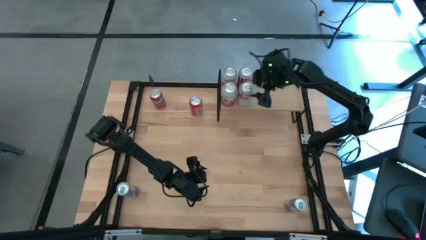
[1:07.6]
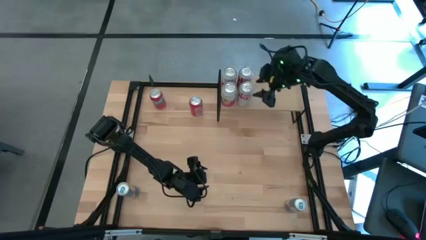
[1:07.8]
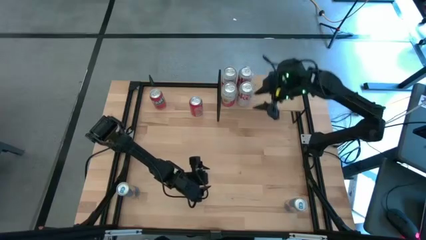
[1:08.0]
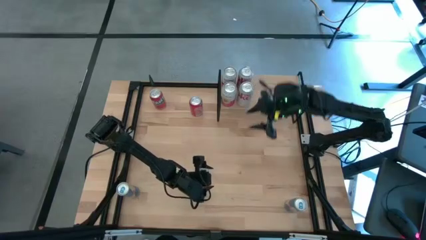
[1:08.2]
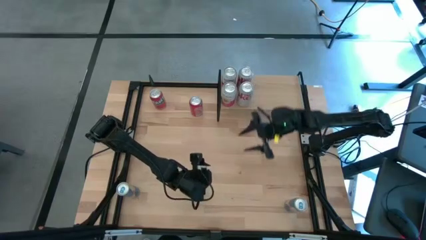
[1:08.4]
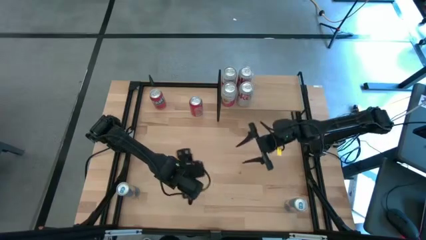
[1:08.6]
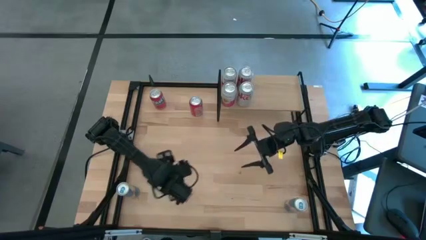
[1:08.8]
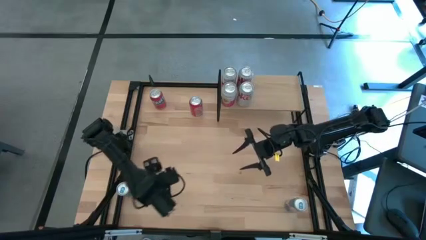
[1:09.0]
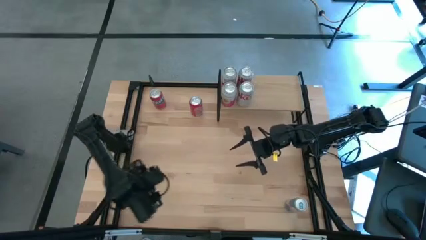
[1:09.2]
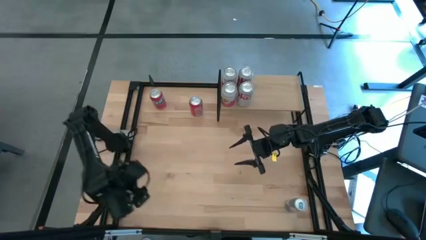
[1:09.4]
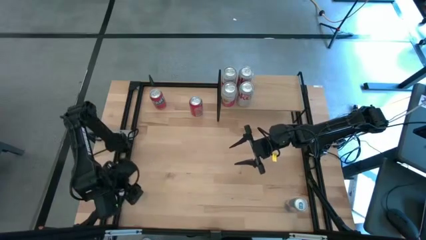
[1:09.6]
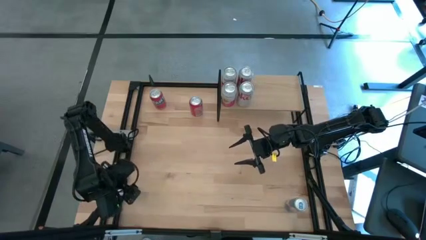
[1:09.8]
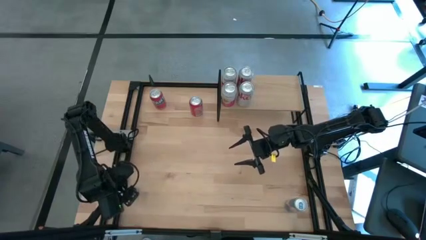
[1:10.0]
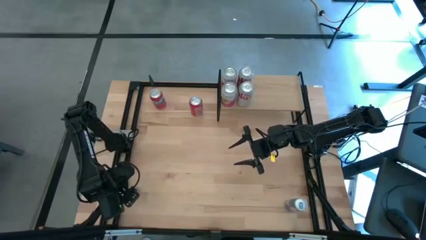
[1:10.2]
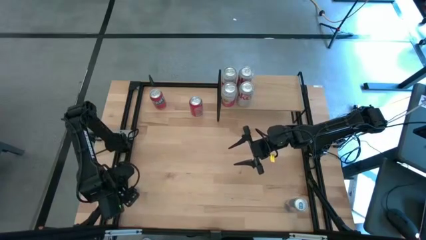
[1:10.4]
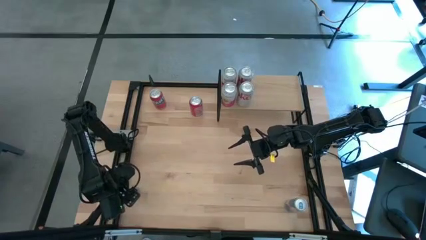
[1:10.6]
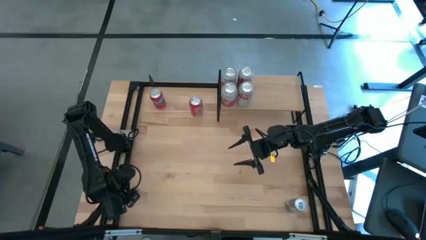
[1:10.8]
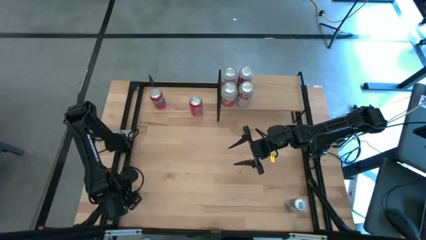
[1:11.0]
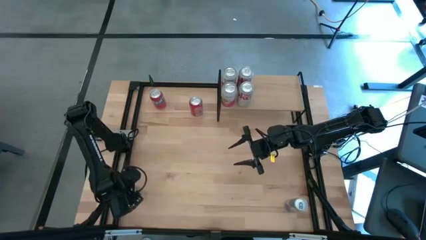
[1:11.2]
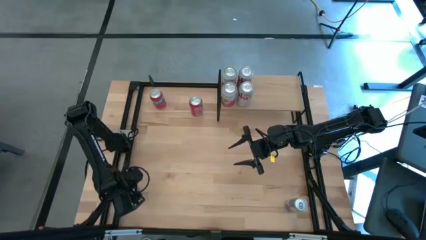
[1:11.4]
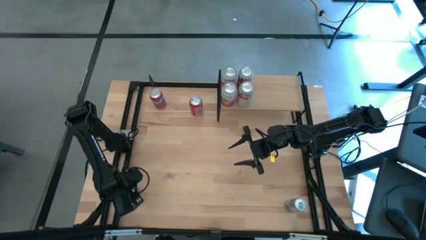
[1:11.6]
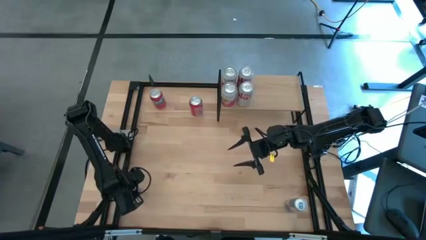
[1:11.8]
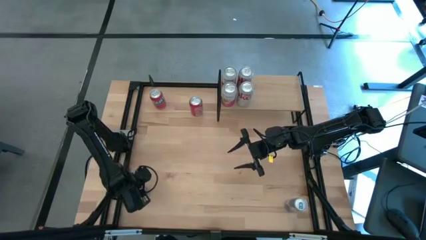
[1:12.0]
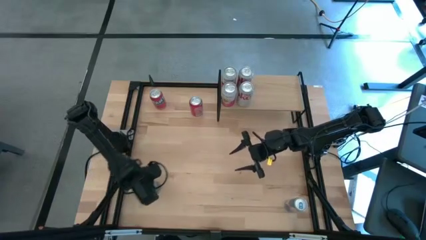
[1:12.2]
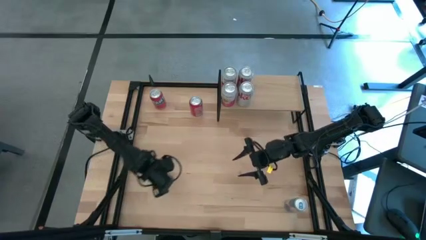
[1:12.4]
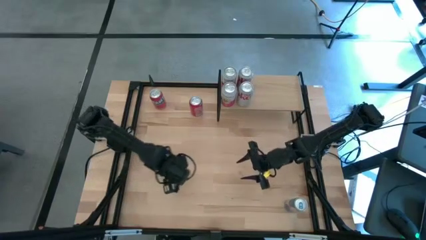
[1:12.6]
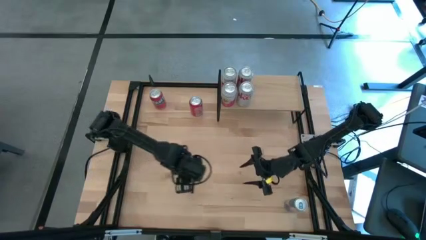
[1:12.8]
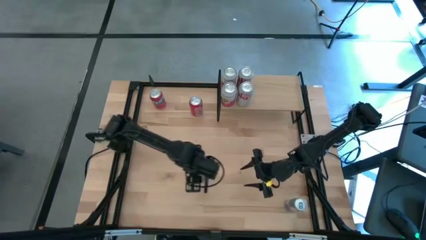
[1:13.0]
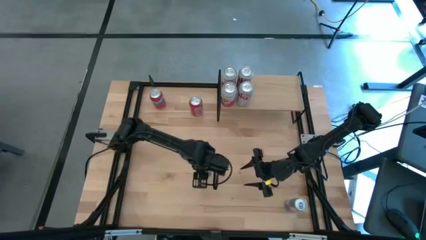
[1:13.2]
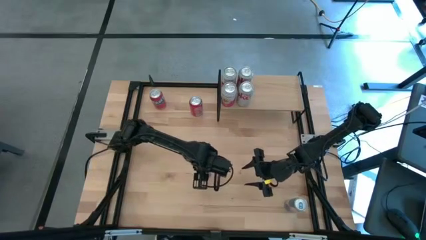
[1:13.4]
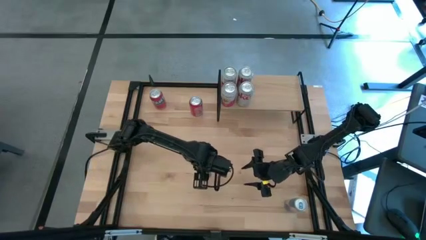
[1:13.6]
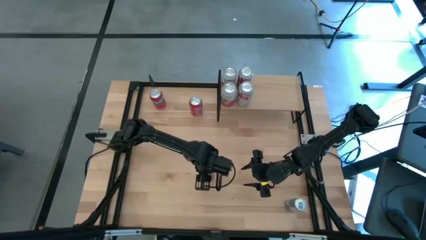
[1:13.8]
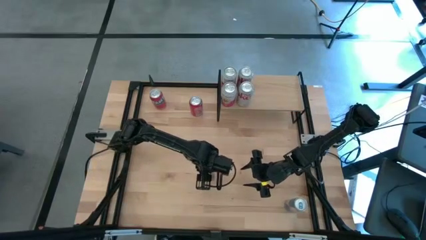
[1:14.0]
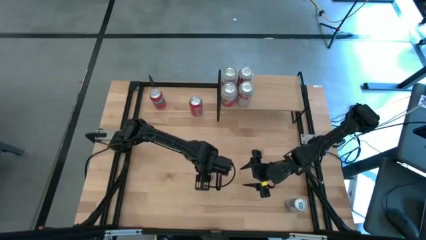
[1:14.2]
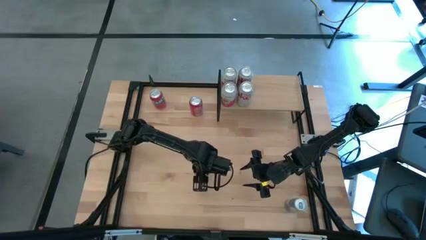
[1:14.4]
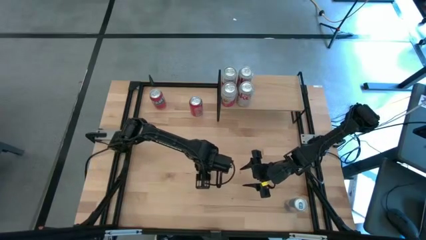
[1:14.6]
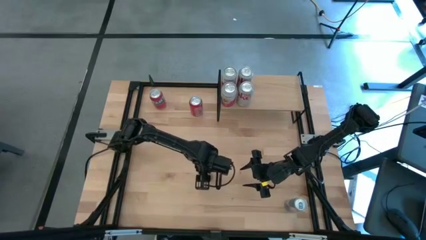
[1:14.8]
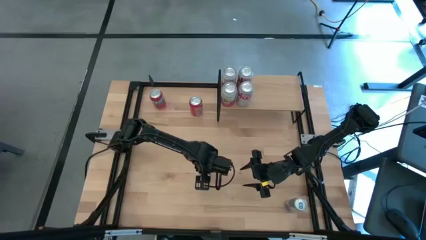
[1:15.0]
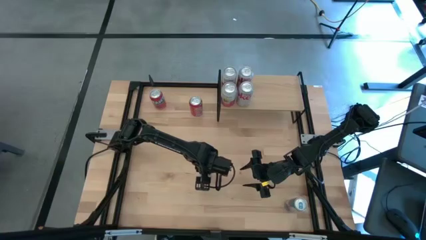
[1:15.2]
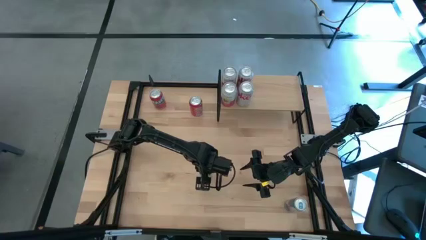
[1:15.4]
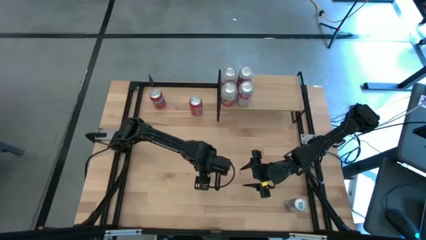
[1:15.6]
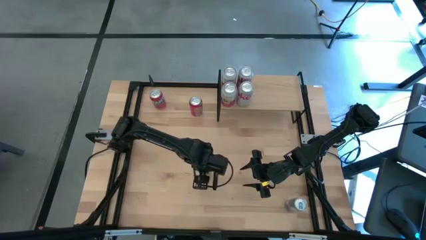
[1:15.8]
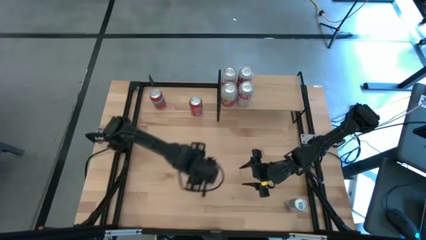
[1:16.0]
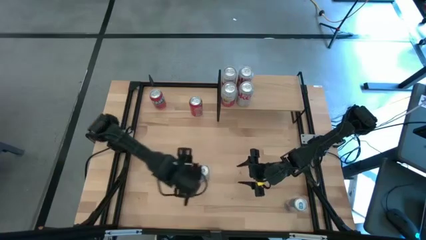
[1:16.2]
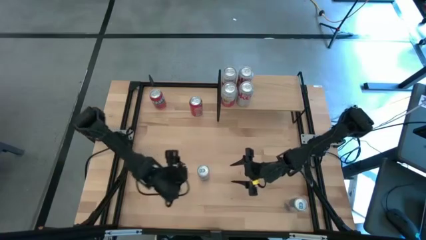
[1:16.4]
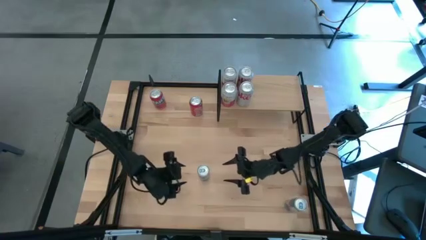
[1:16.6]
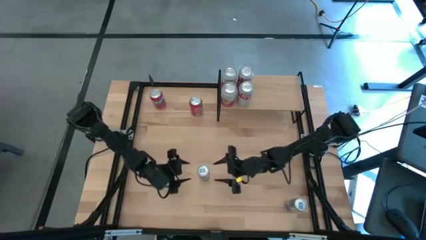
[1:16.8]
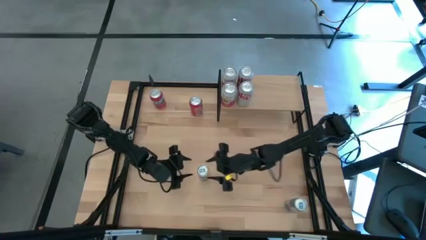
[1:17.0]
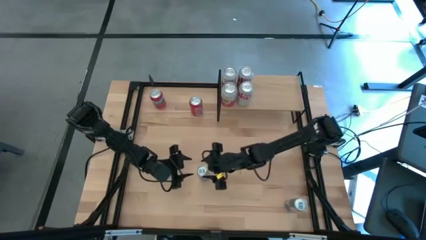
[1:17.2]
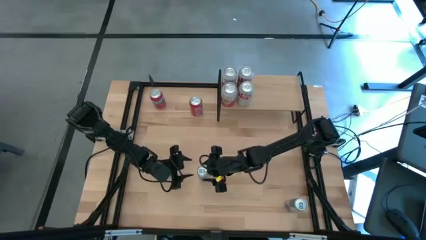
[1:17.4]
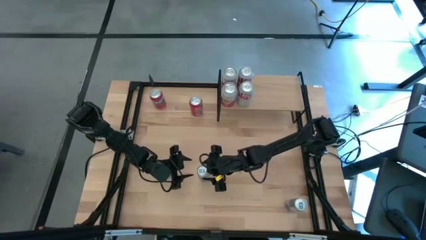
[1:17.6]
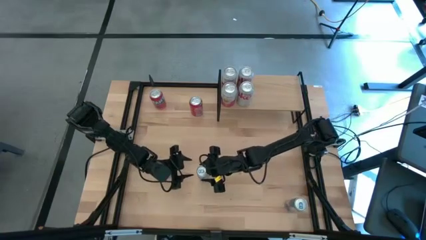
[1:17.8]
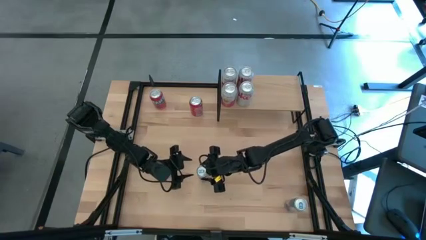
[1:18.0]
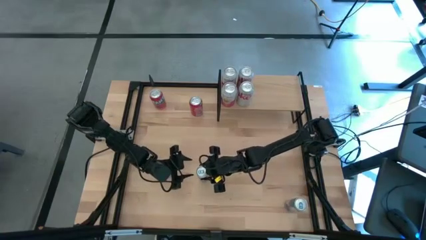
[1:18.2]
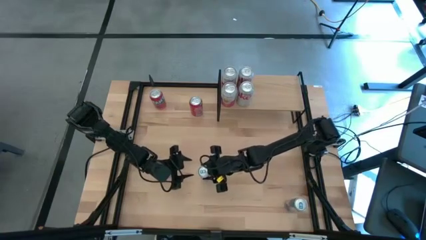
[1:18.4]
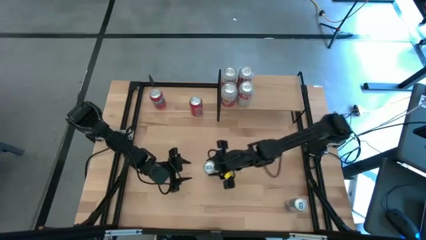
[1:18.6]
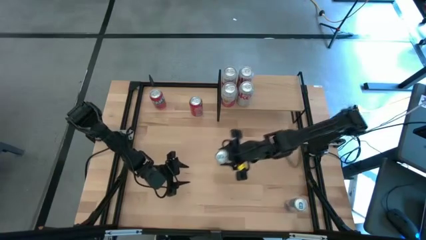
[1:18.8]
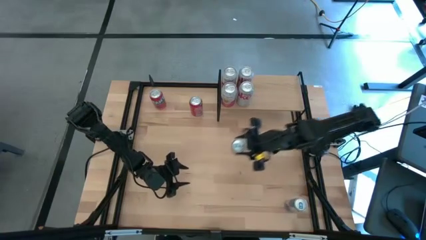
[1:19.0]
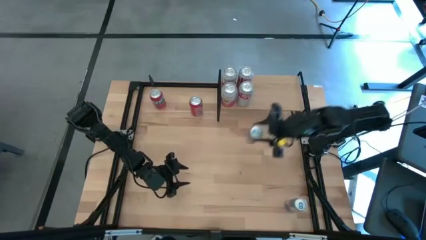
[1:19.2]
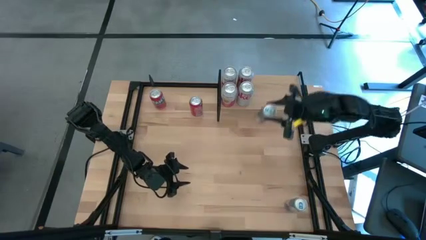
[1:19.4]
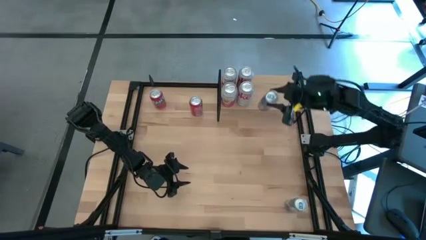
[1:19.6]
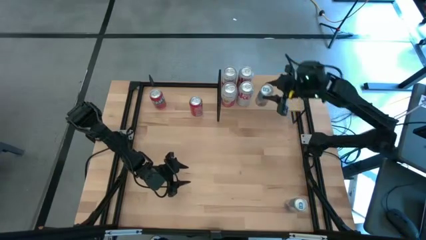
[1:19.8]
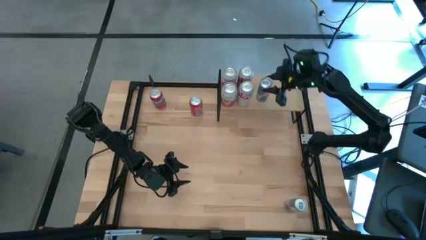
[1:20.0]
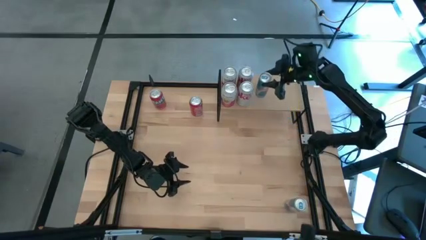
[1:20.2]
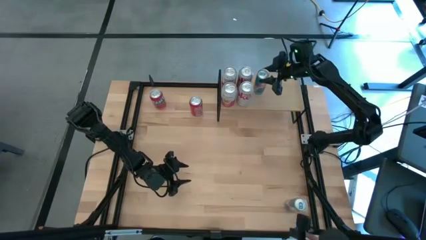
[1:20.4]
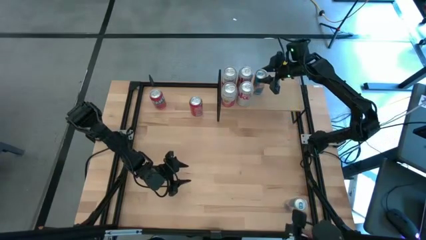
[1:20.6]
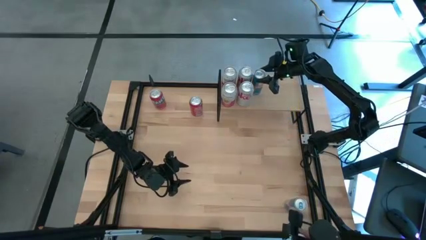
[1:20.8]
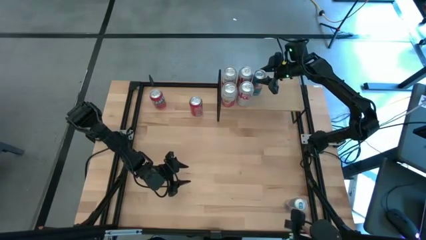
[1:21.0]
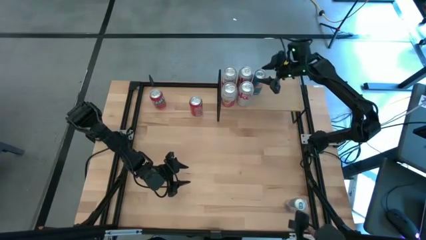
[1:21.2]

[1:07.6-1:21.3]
Task: Place canned beverage on shelf
Put the left blue soda can on the shelf
